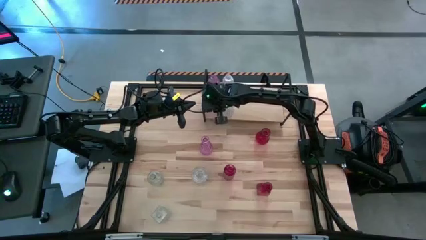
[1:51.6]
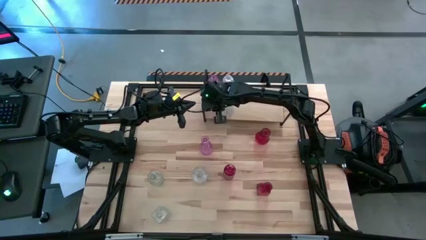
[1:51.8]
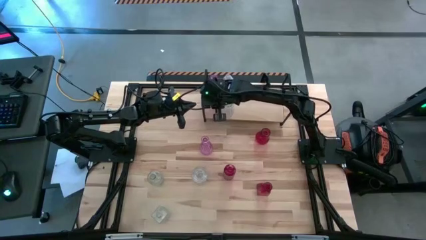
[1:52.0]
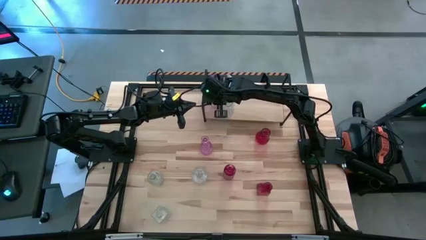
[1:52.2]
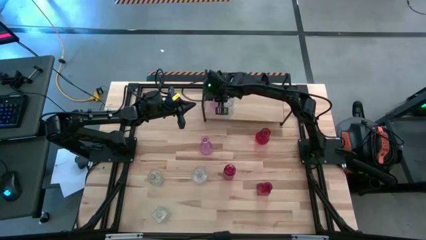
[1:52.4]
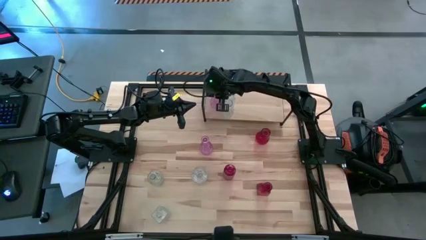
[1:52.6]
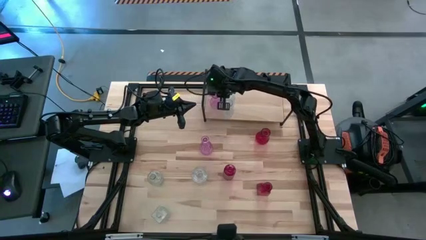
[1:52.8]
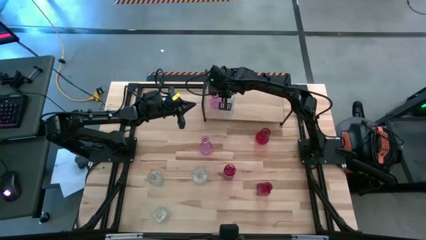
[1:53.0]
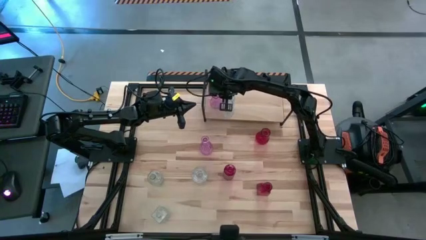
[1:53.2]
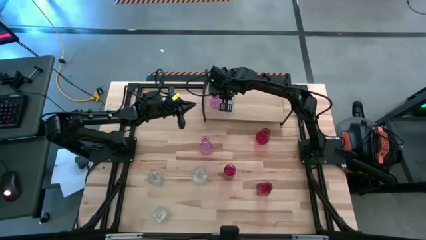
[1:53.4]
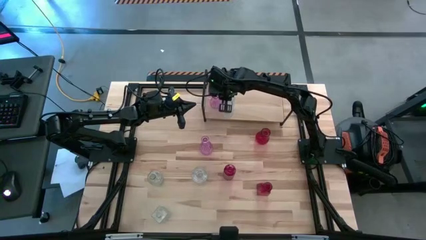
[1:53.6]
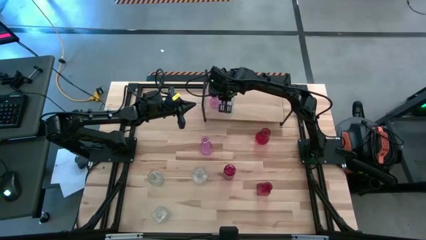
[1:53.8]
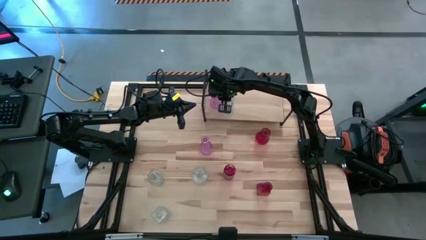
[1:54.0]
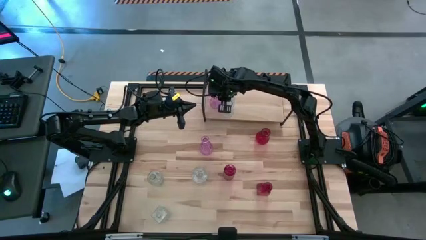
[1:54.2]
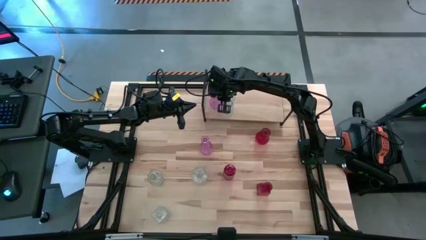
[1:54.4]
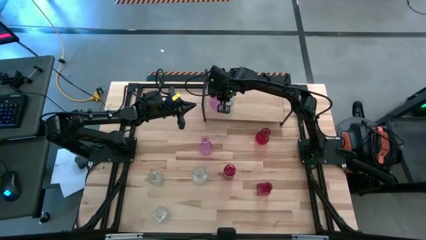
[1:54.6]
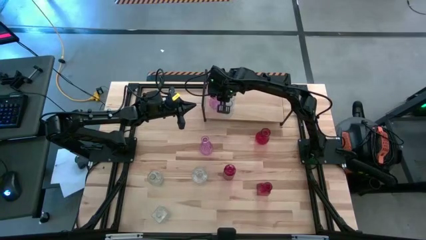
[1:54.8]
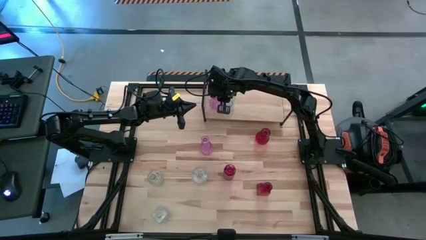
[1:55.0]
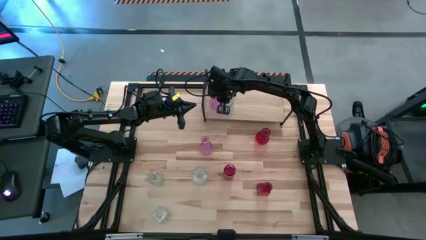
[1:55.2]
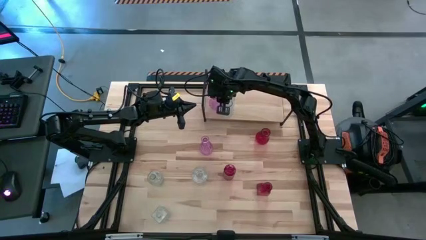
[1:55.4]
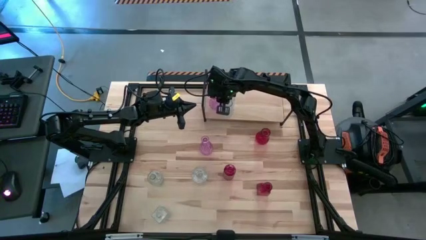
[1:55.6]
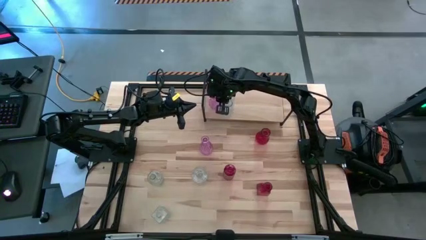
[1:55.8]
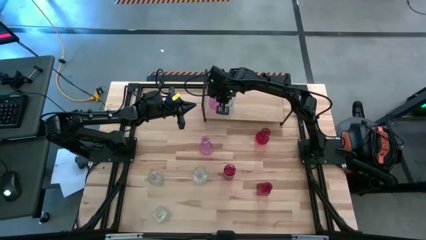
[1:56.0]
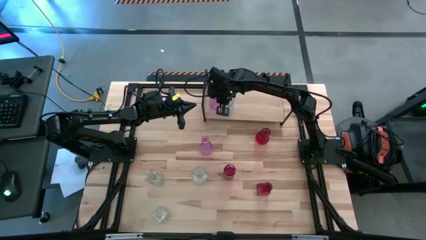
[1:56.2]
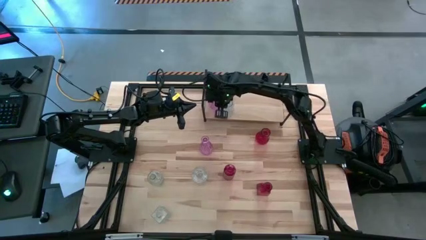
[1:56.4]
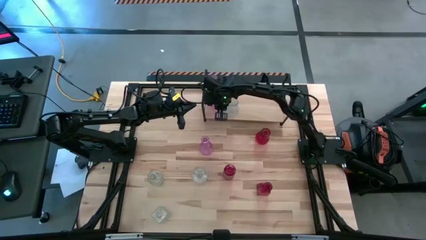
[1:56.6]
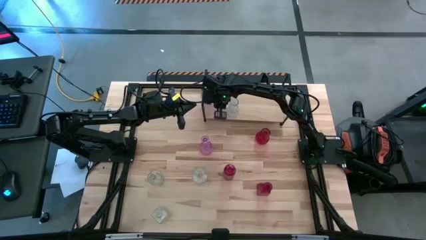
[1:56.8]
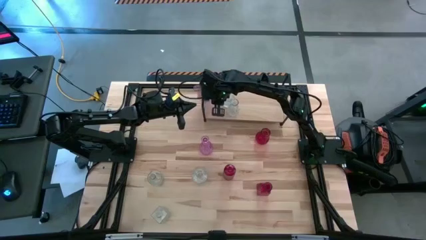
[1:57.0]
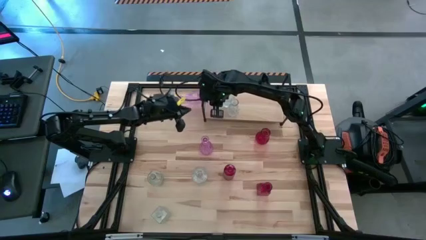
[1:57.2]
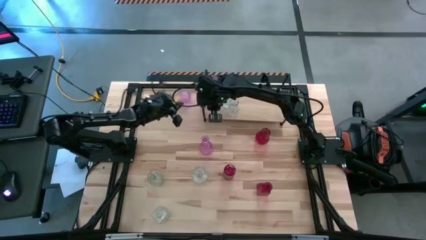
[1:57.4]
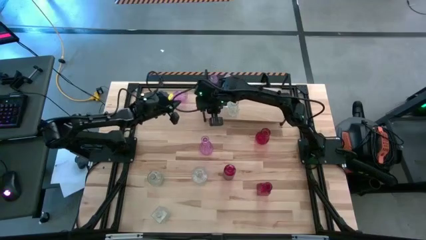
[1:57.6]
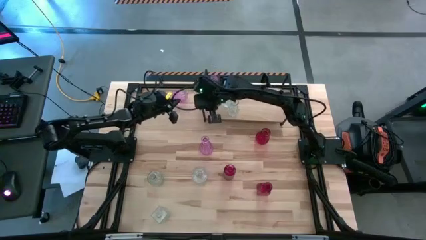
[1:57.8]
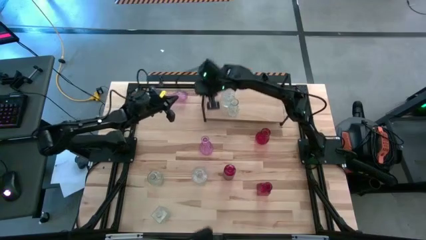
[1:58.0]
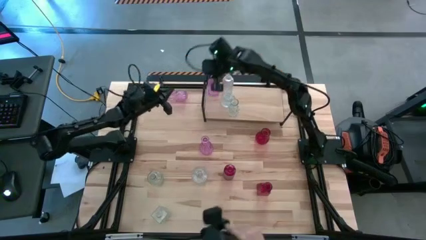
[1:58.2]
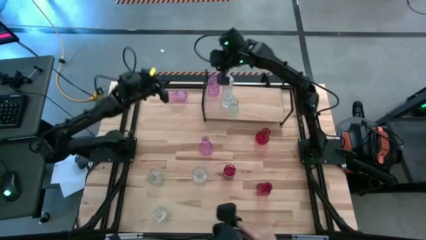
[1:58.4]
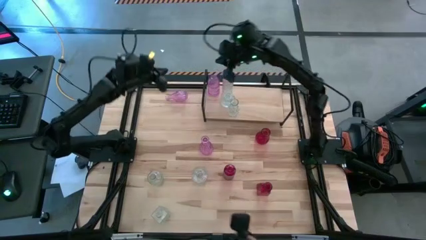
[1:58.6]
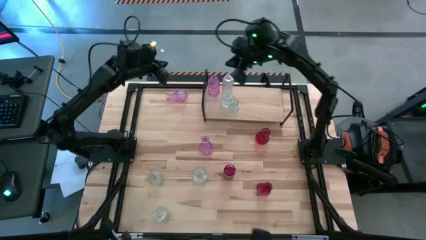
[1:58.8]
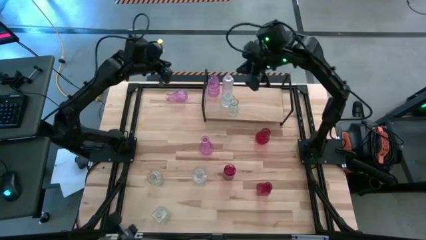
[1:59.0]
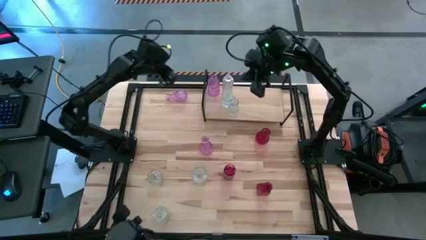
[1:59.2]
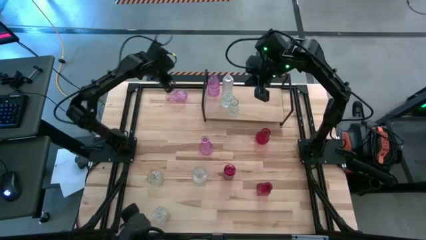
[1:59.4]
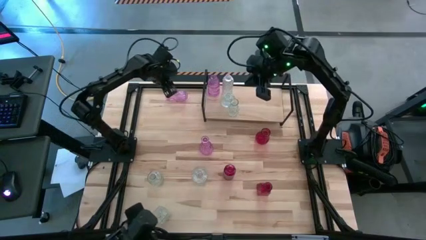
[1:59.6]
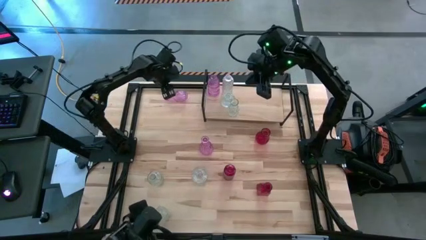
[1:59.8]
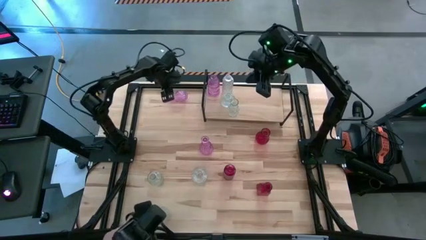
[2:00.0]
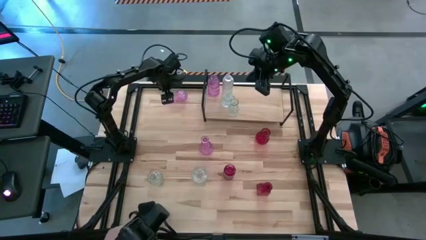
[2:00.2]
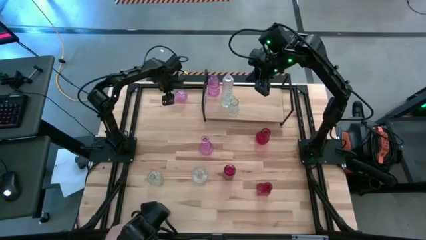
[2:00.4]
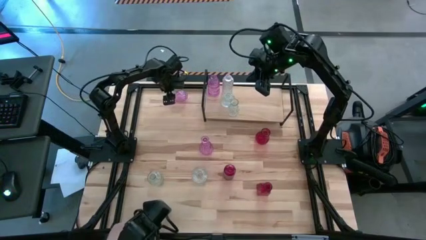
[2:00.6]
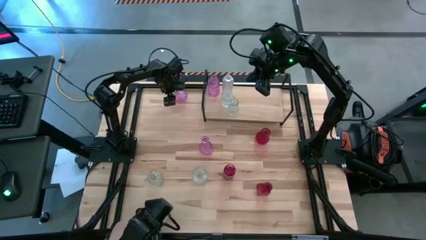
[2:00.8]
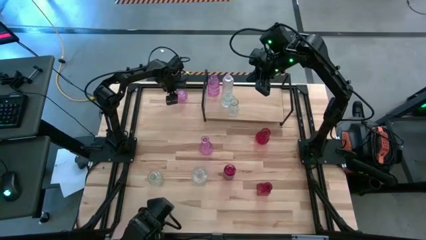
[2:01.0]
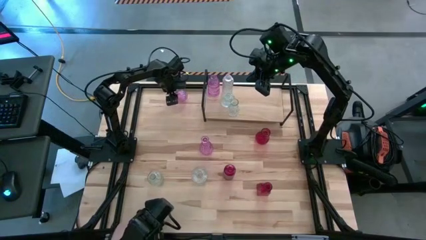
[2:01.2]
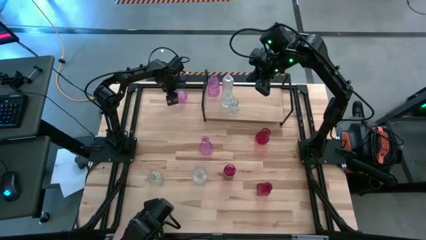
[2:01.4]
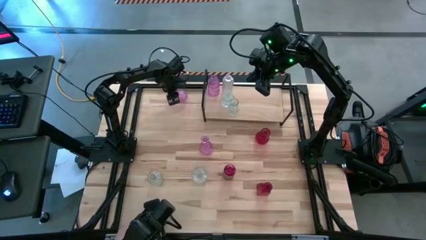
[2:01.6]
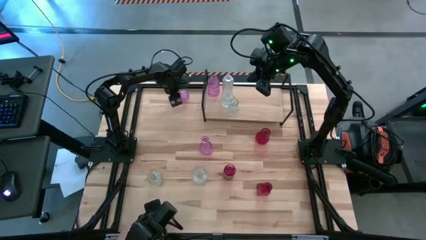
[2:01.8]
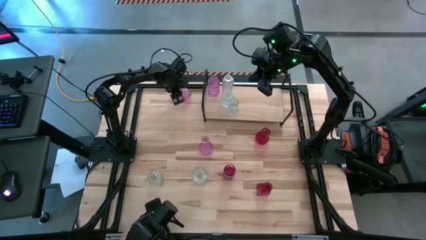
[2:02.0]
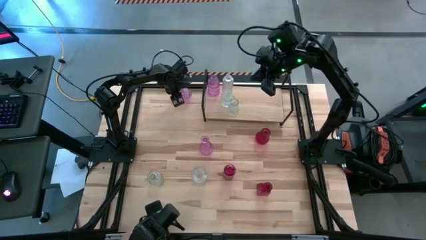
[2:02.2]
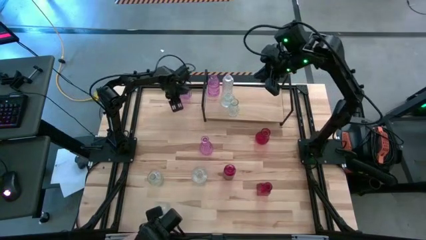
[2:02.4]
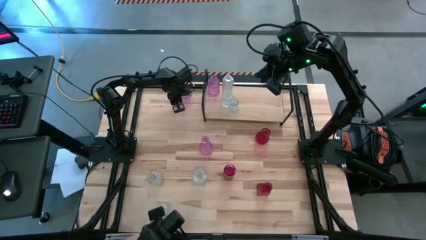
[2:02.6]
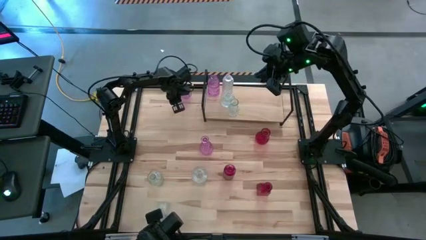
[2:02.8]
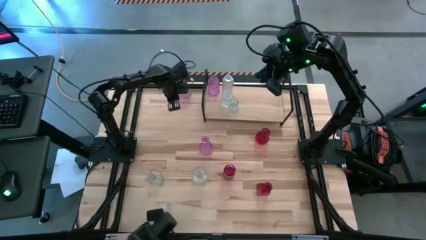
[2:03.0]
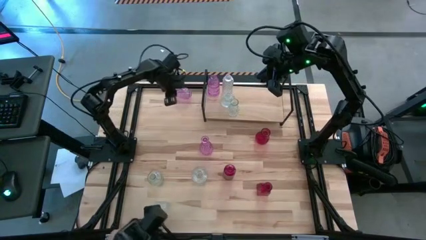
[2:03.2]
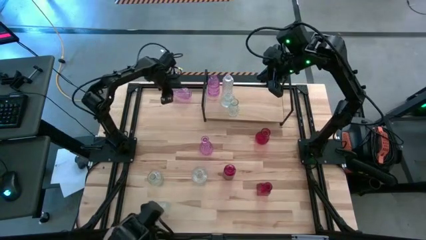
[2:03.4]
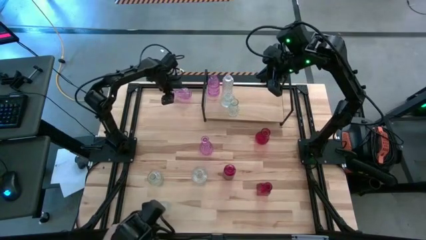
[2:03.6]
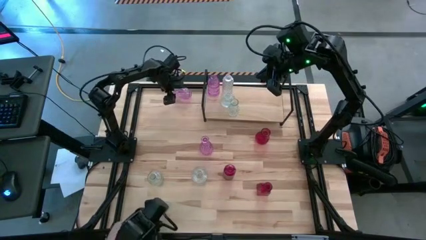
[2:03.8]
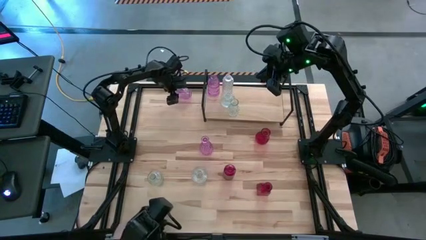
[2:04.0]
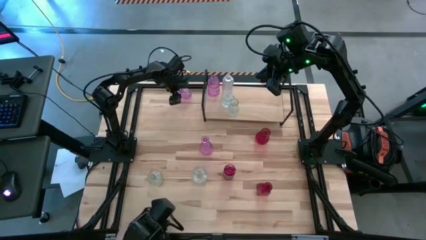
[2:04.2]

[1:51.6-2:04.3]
Task: sort vases onto shelf
Align the violet vase with the other violet vase on the shelf
